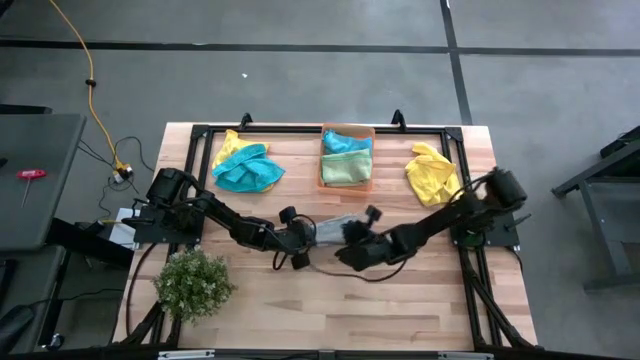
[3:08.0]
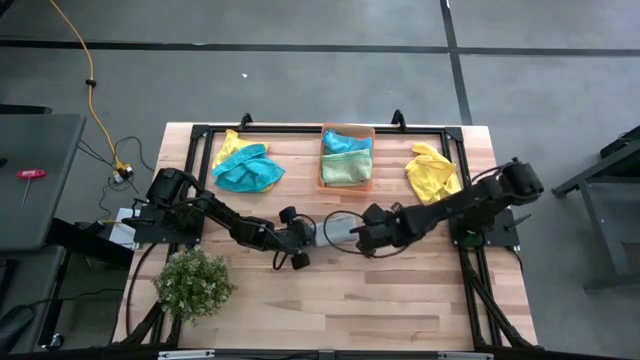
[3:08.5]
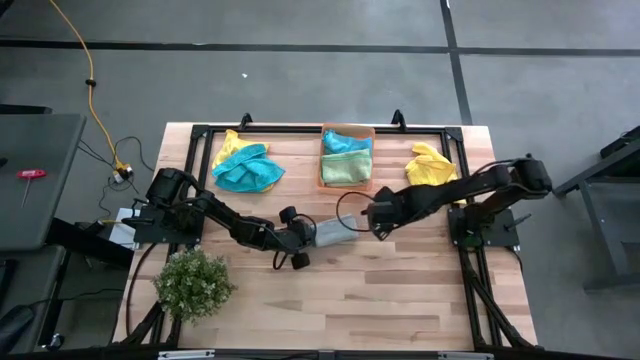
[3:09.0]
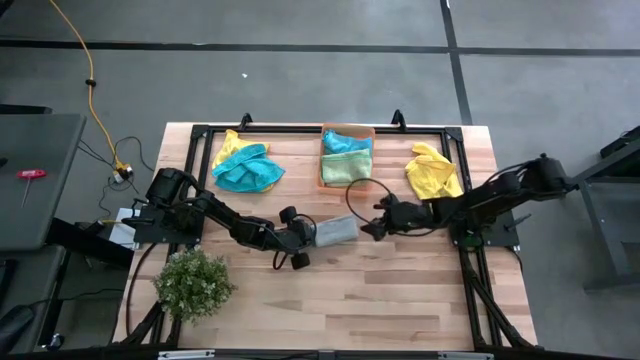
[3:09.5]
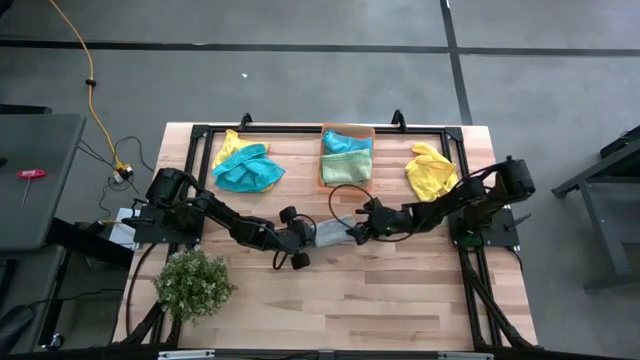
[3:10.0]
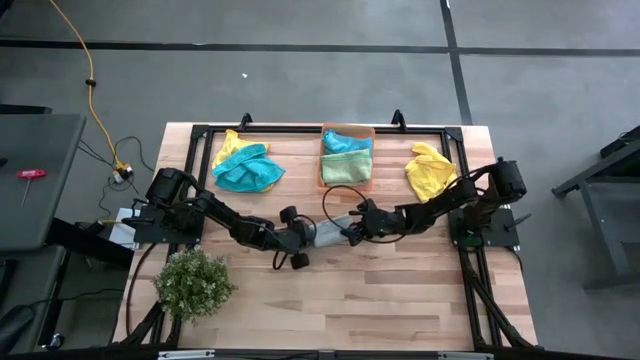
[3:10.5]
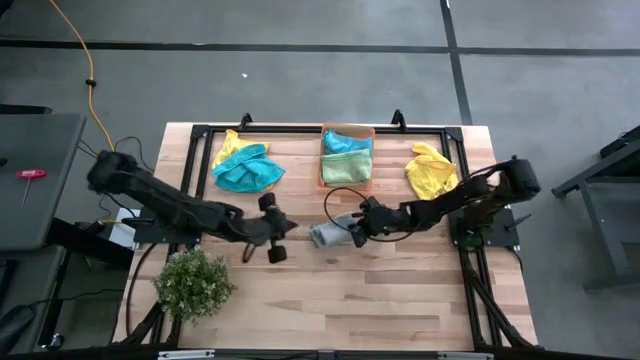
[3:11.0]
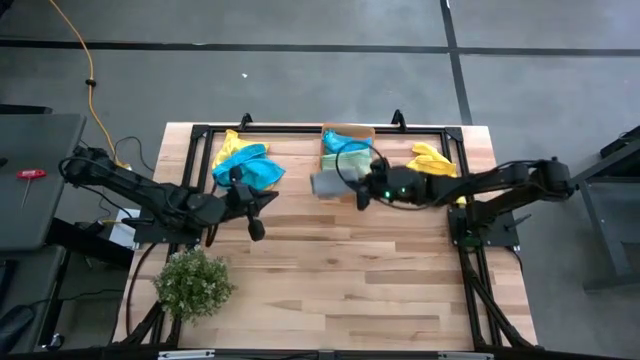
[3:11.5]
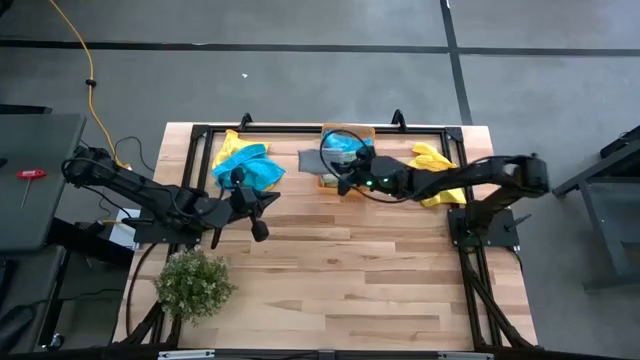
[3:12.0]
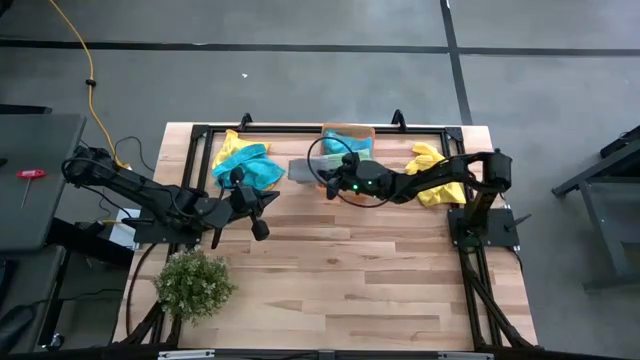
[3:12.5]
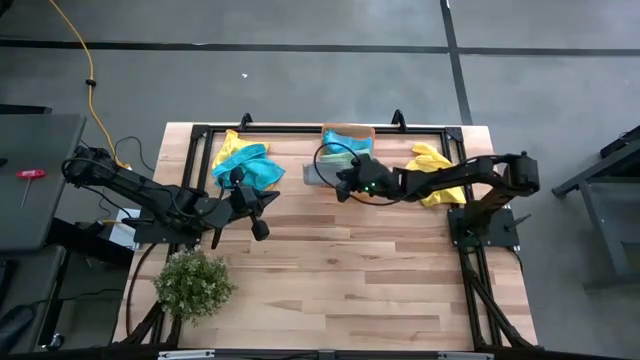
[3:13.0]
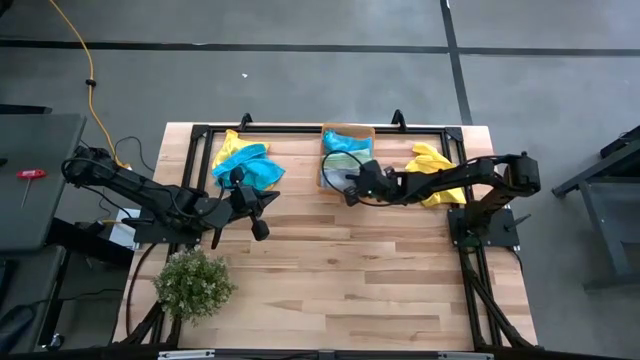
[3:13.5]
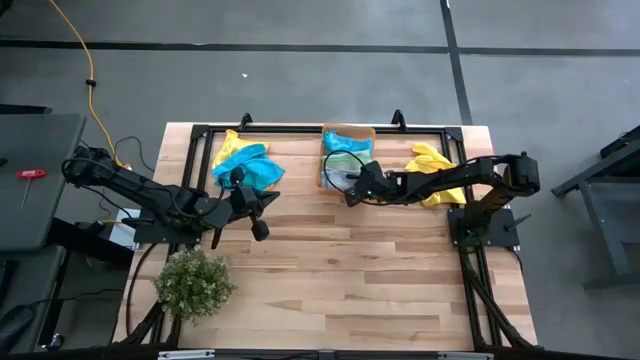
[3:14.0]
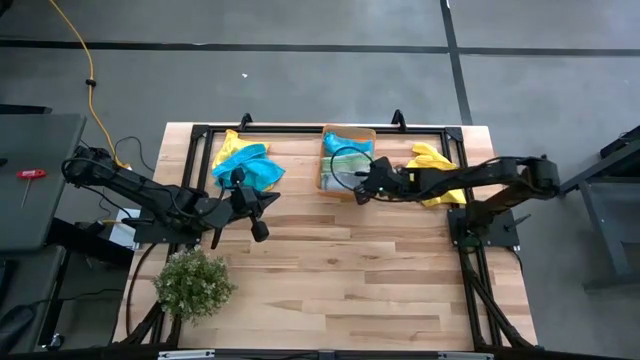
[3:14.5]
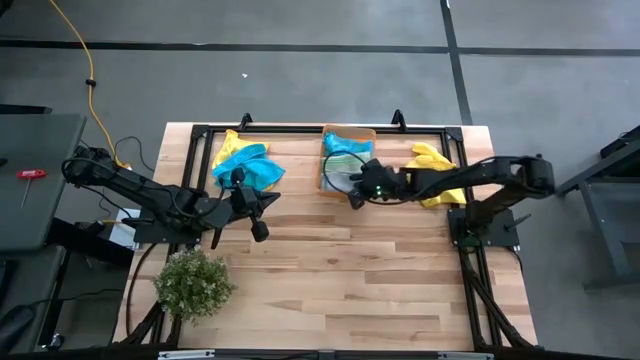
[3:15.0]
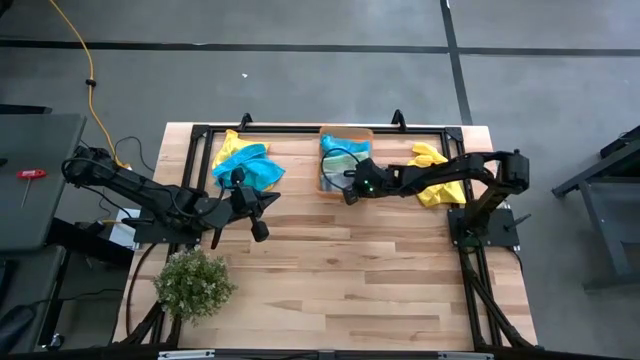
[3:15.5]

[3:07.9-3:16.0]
Task: Fold microfiber towels
Put the folded gray microfiber cloth into the orange bin

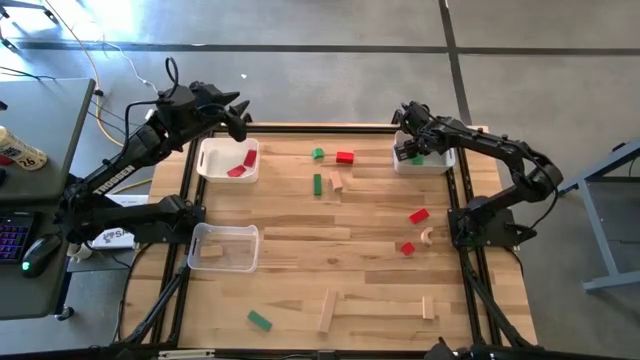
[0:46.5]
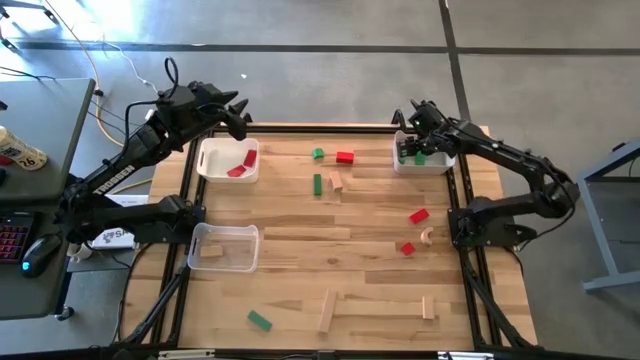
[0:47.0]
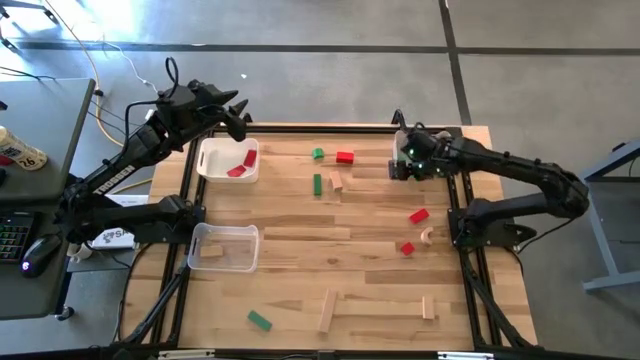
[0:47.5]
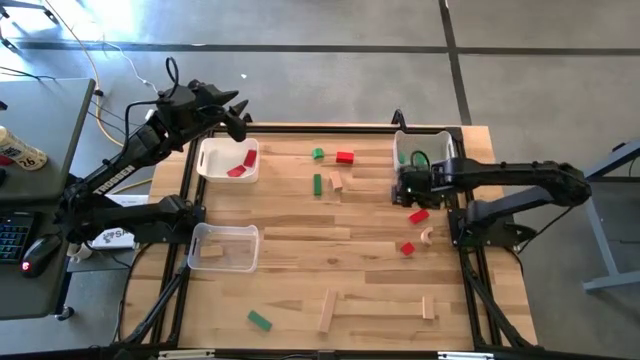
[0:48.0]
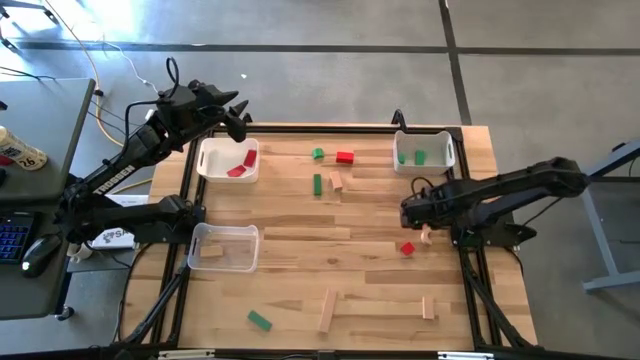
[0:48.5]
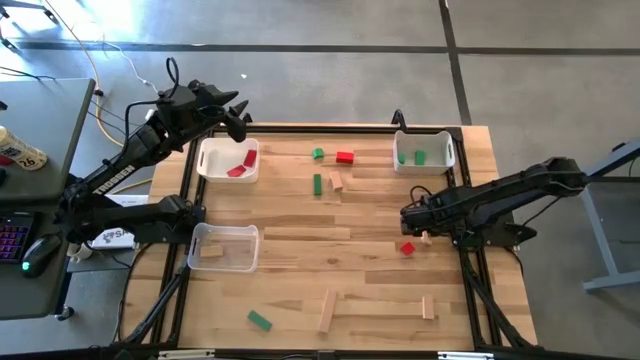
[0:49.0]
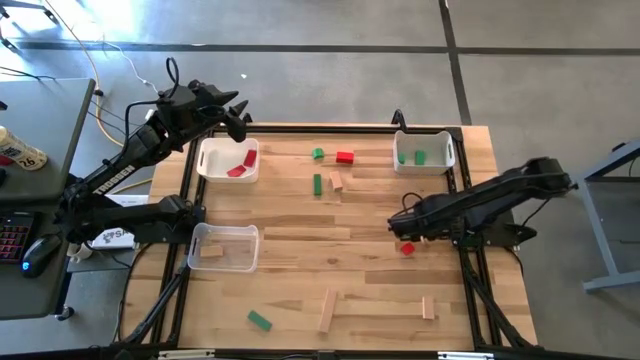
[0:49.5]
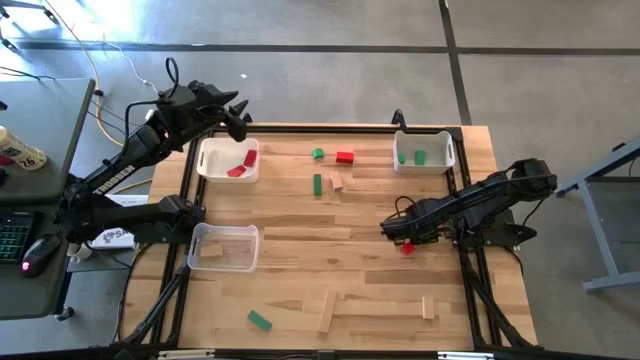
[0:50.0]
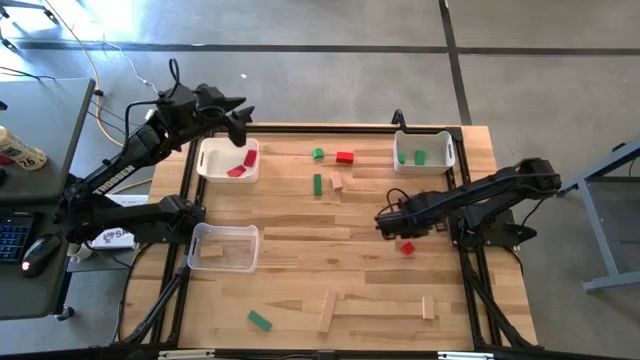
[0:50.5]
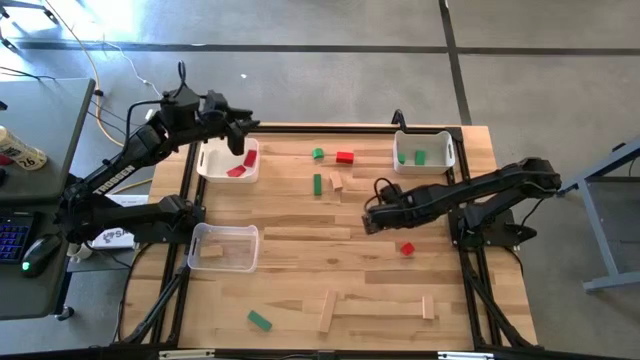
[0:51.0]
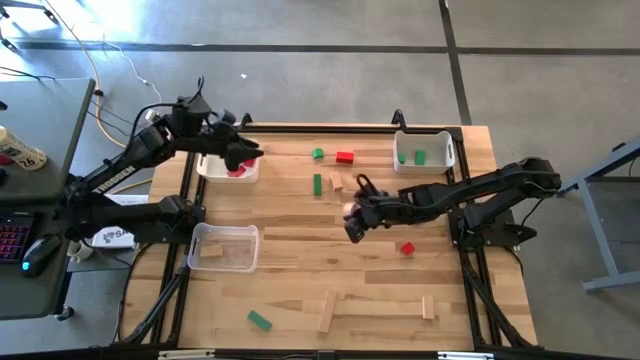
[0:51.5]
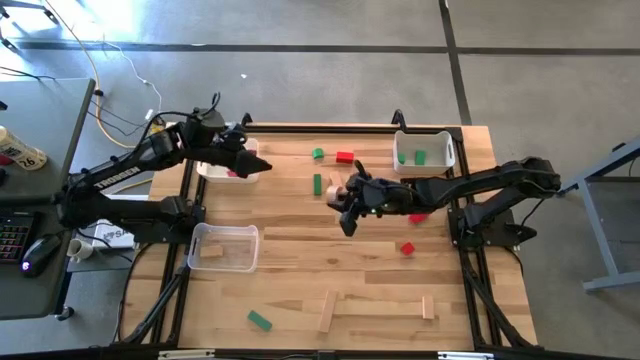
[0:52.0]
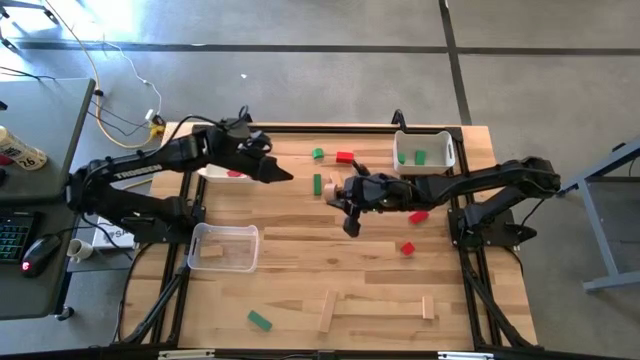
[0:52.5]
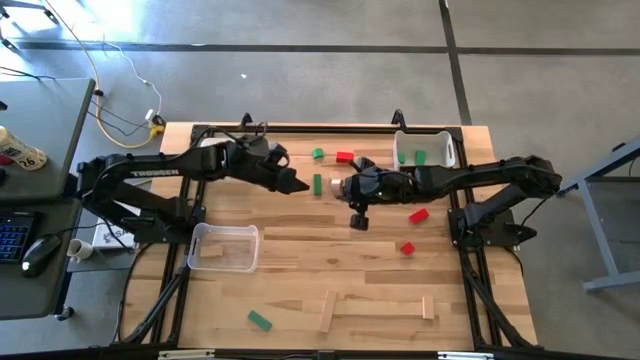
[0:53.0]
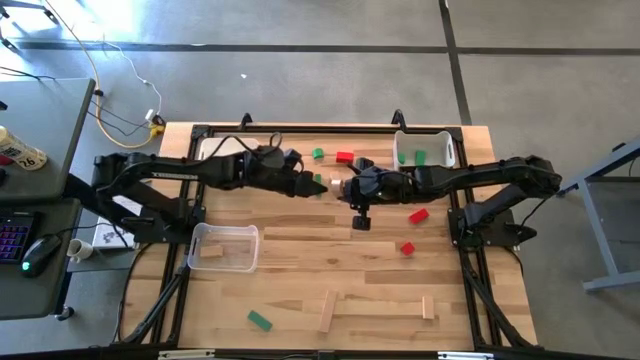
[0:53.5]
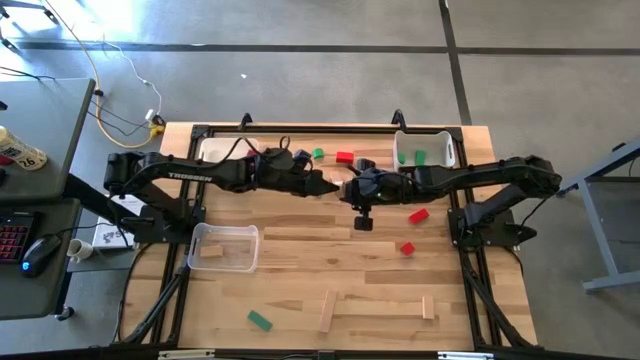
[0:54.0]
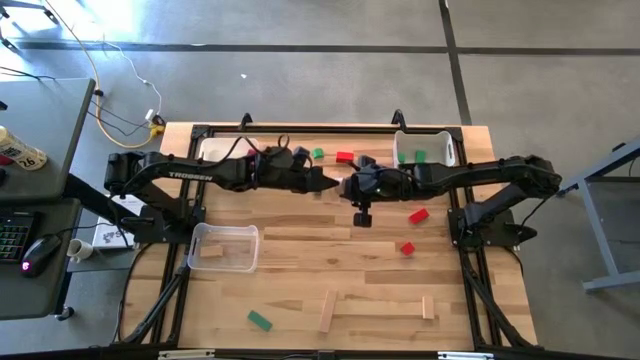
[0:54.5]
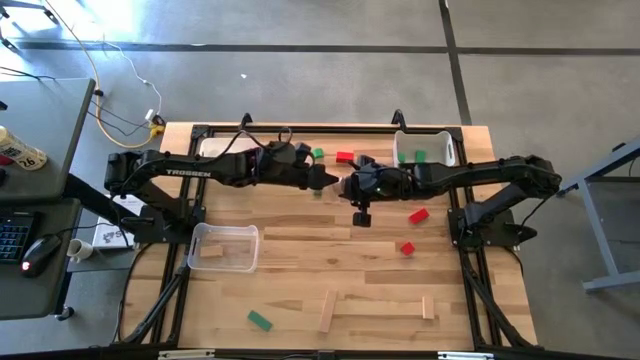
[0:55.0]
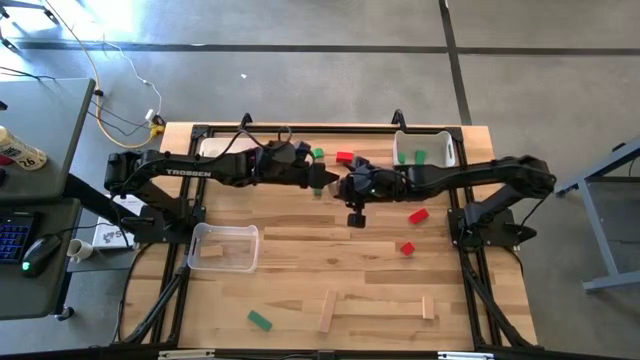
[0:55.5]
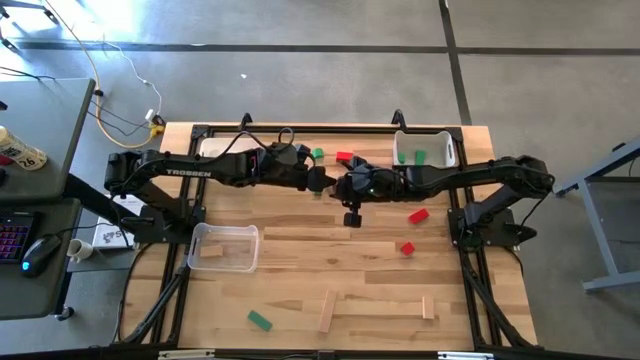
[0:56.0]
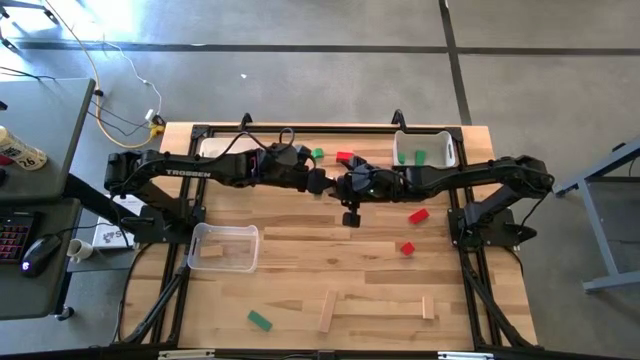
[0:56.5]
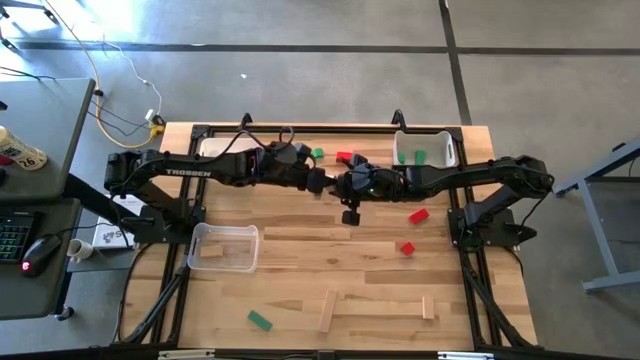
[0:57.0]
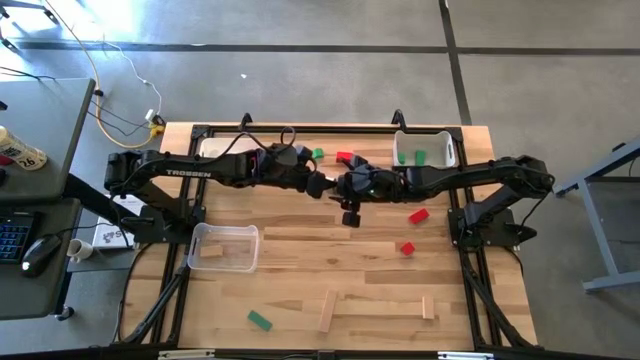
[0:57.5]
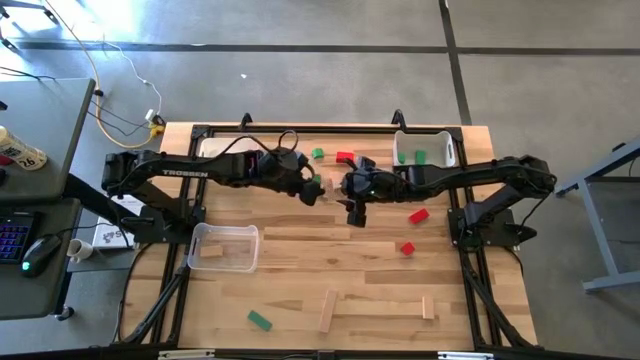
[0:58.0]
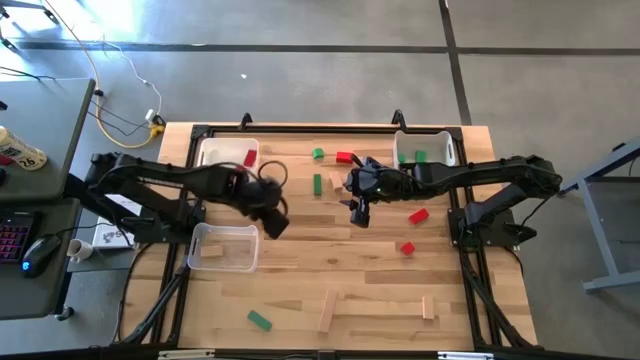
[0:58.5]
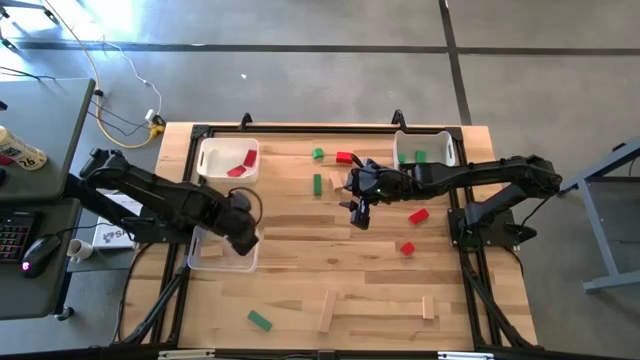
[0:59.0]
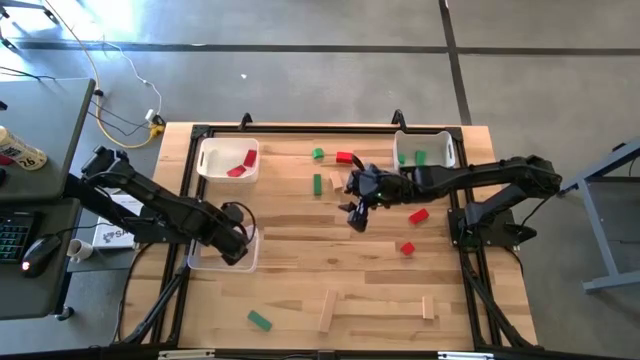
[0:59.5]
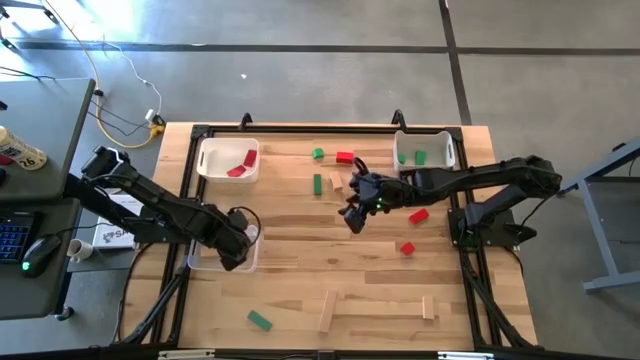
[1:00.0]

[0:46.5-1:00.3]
Task: Sort & place blocks by color
Put the cream half-circle into the transparent bin
